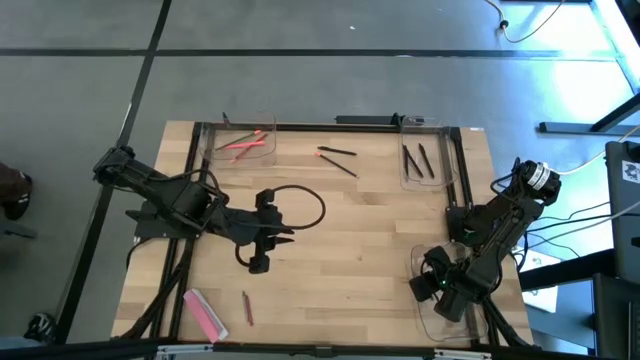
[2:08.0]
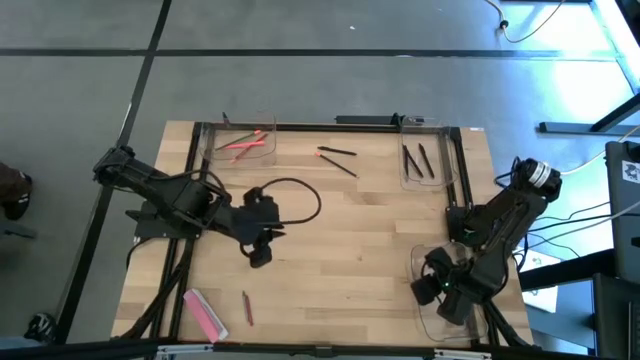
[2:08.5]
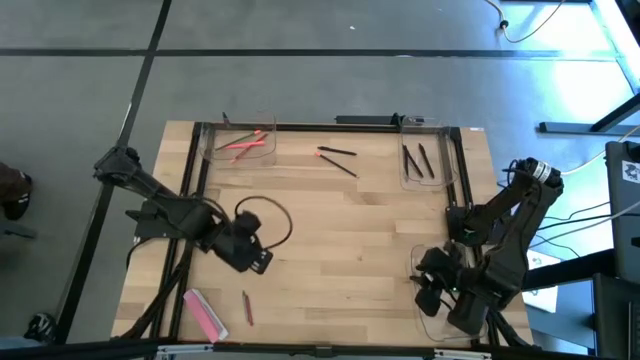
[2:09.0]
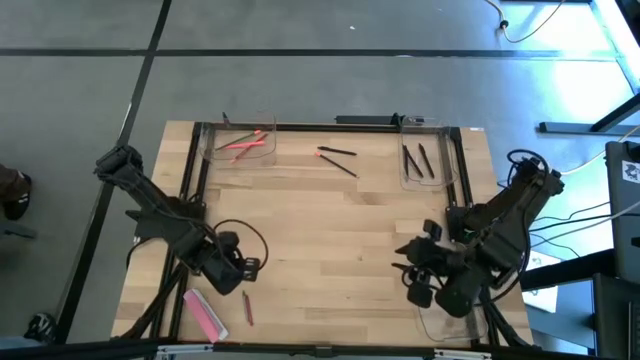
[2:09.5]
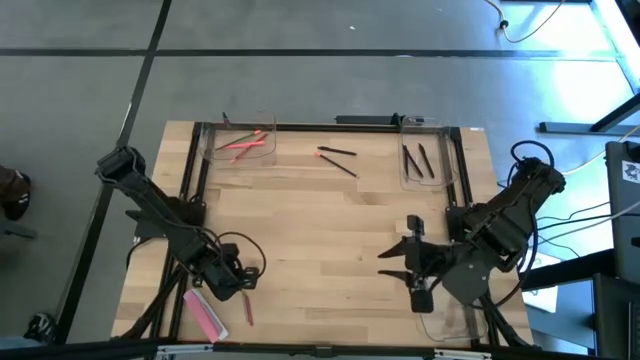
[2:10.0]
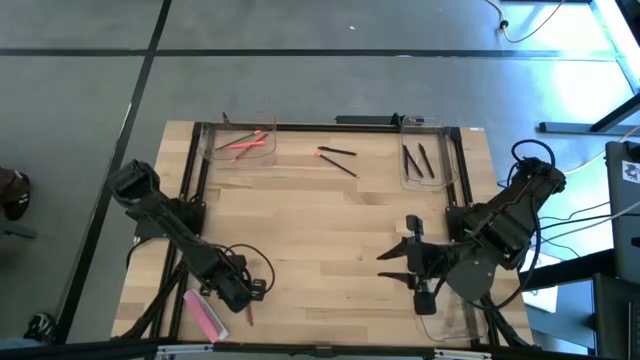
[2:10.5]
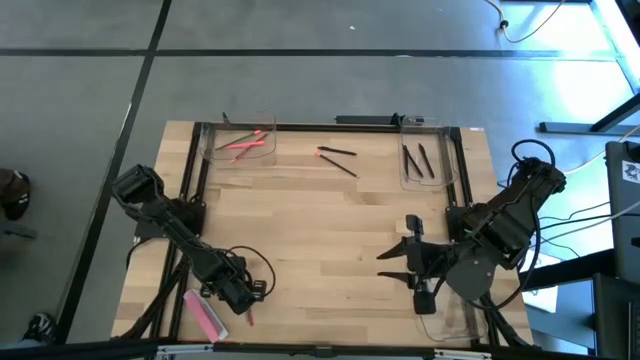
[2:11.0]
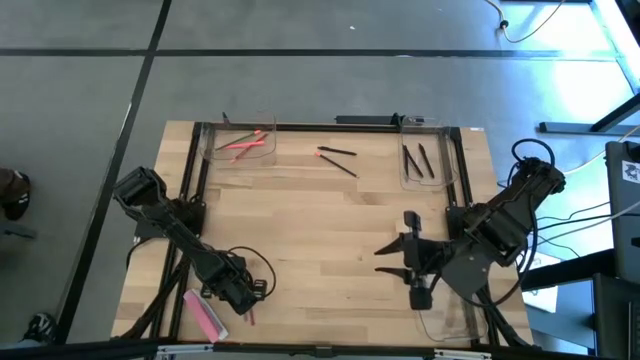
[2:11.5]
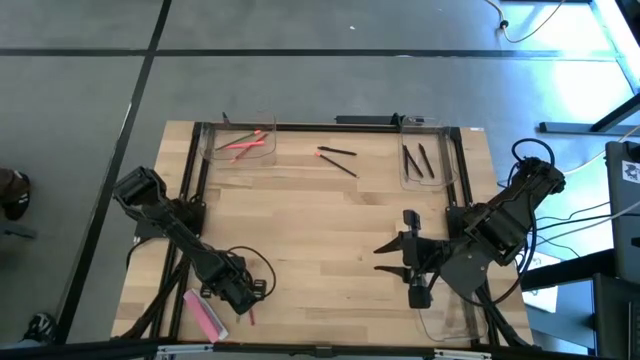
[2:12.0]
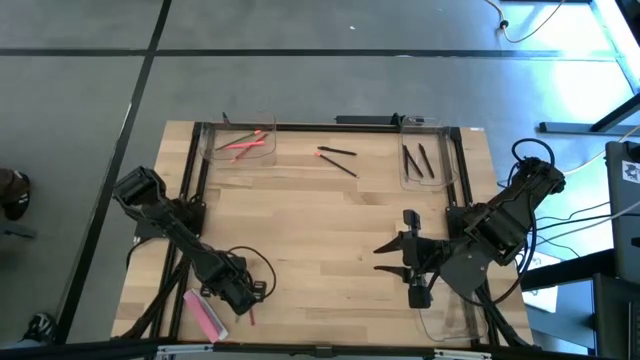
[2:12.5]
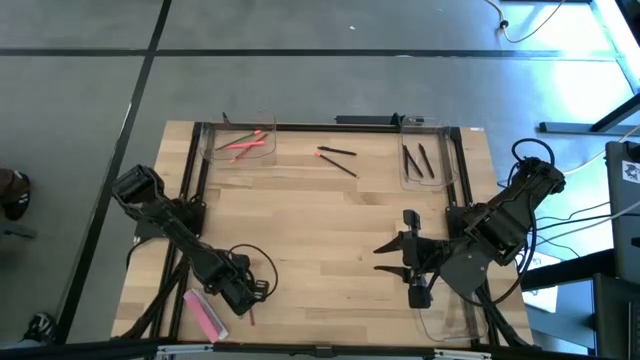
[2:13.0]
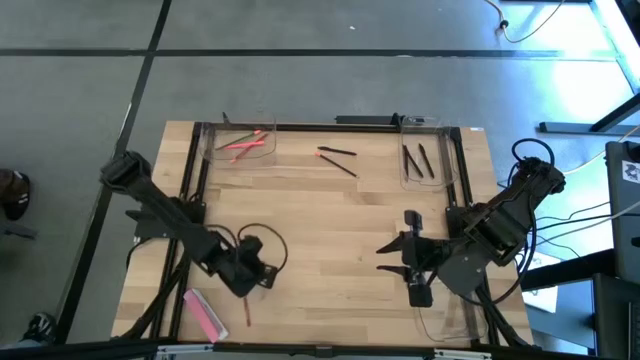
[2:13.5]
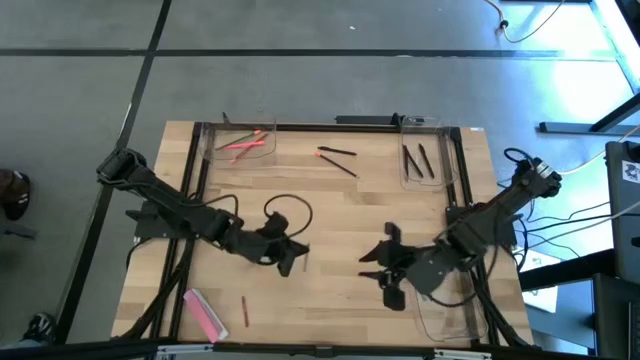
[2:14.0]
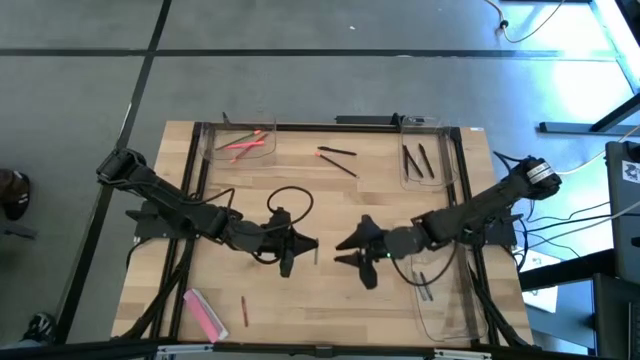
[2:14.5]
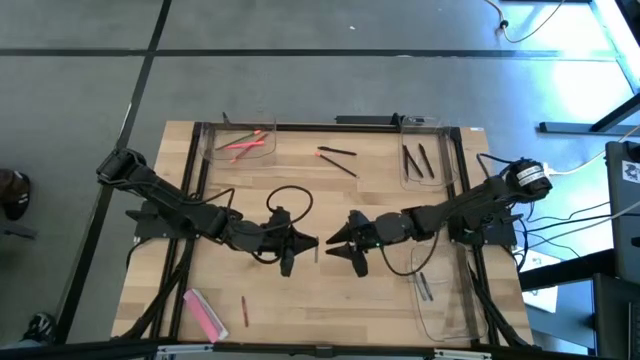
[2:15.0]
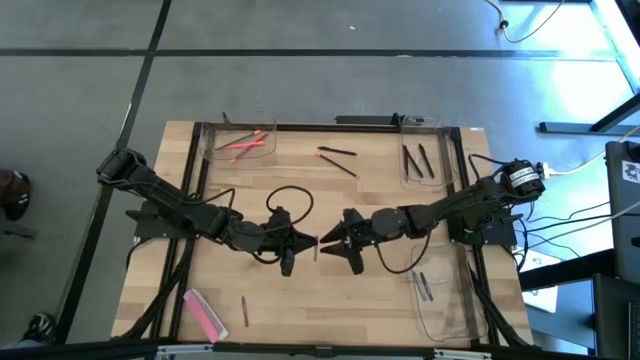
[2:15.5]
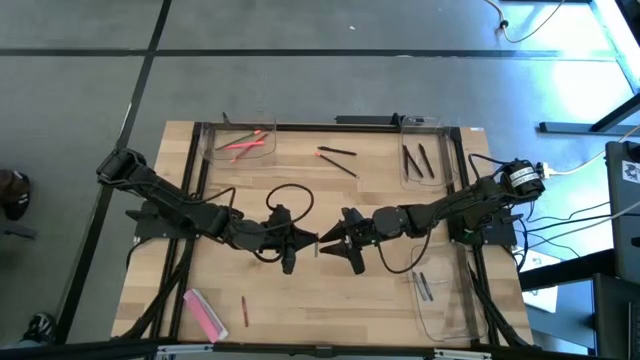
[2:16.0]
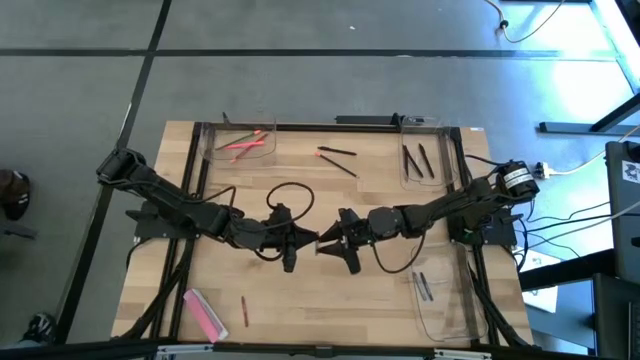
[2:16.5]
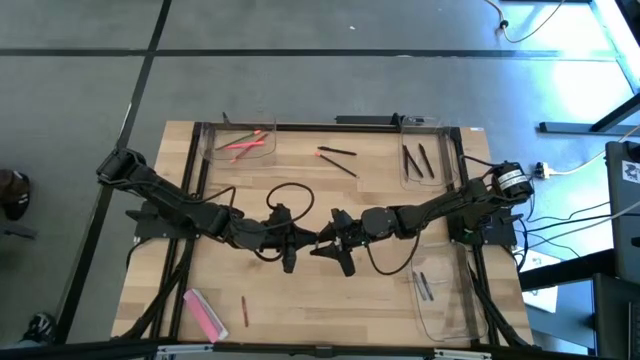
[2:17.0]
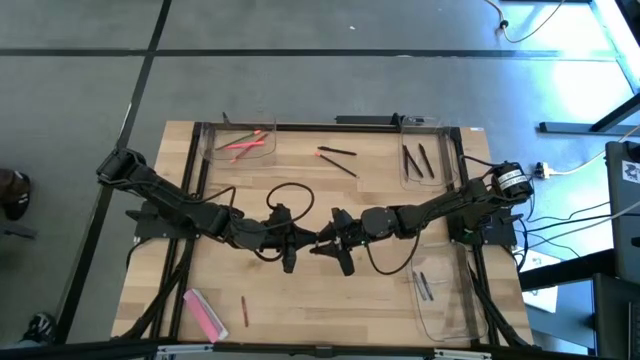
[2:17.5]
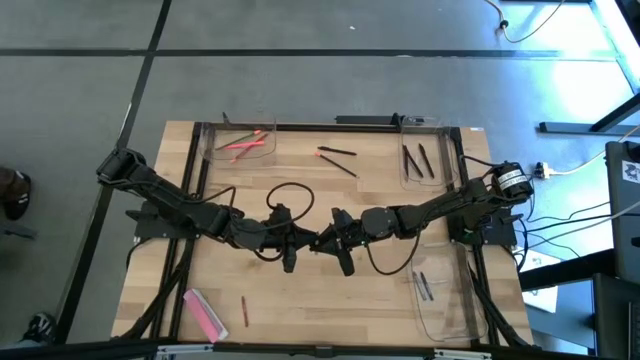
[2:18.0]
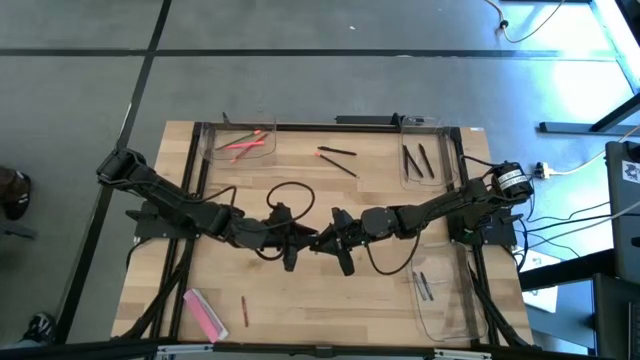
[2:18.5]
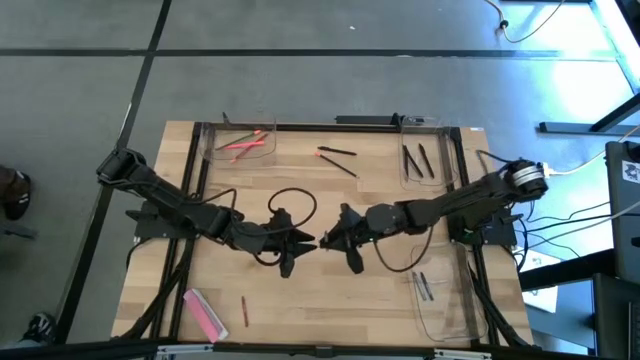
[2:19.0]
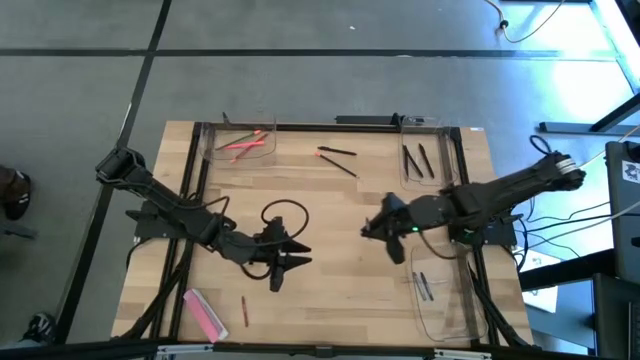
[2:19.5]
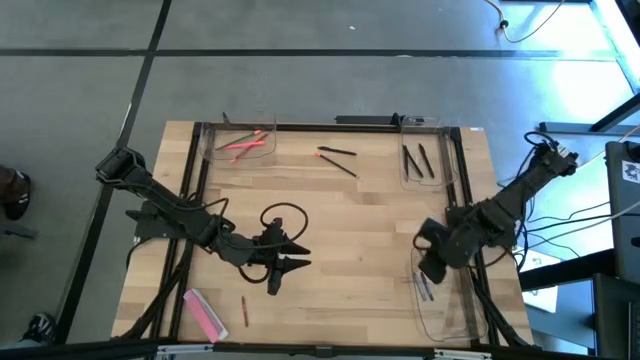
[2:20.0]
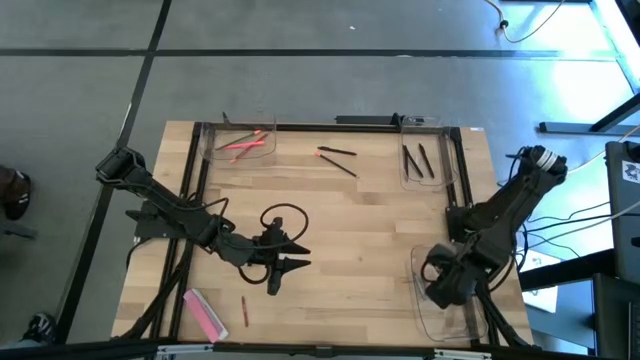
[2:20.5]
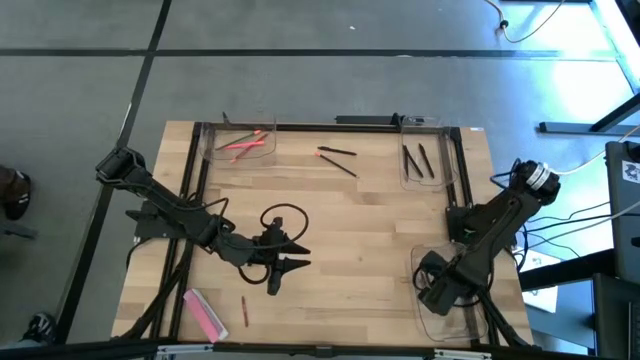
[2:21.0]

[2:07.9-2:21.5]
Task: Sort crayons/erasers/pens/pencils in bins
Put the gray crayon into the bottom transparent bin

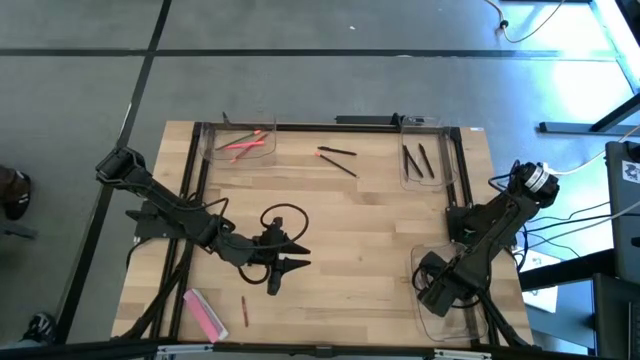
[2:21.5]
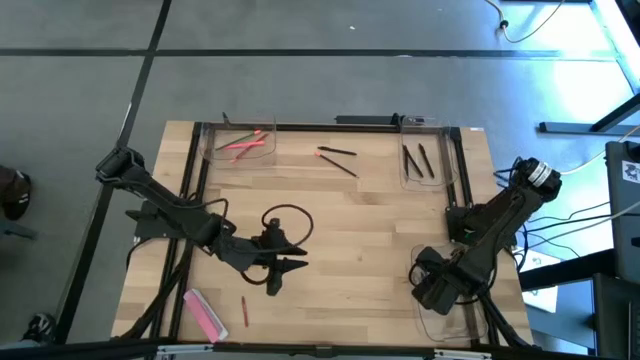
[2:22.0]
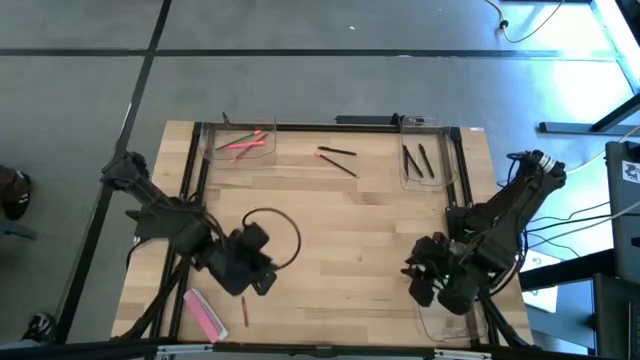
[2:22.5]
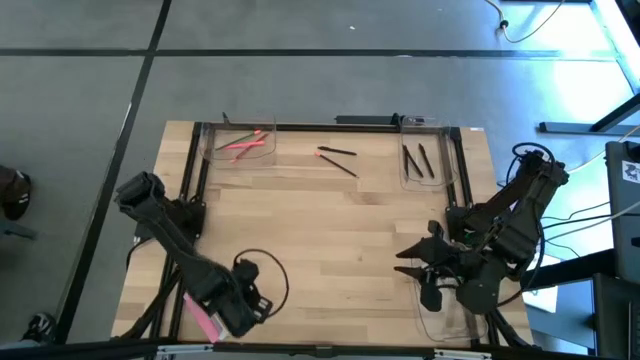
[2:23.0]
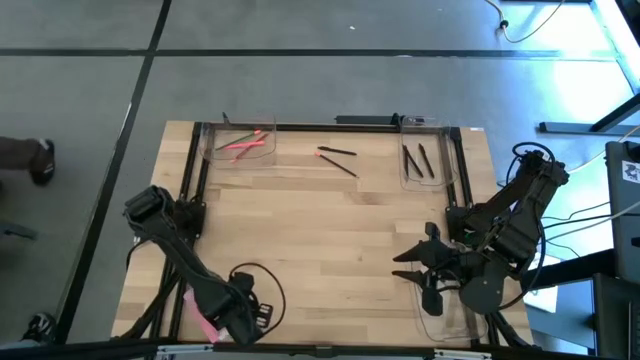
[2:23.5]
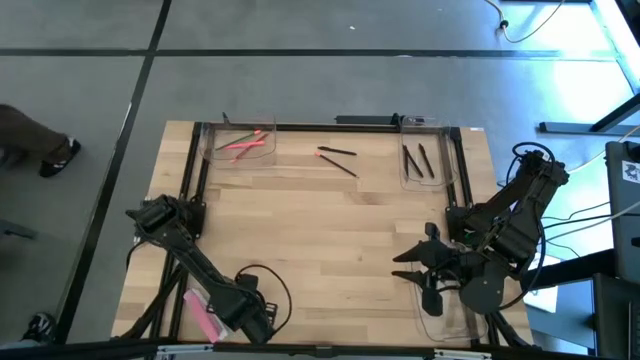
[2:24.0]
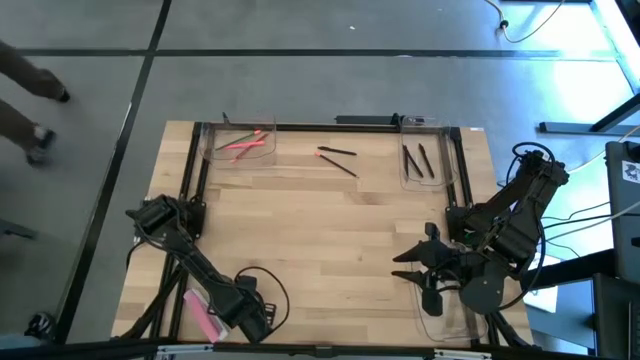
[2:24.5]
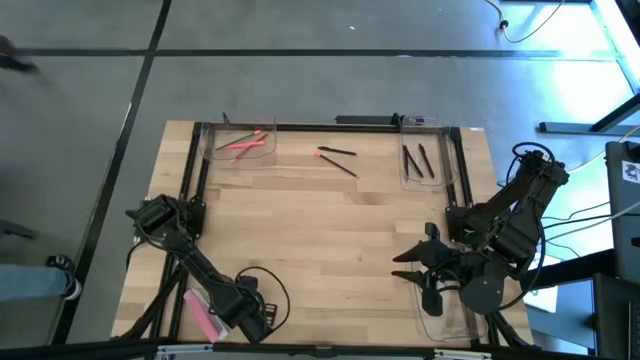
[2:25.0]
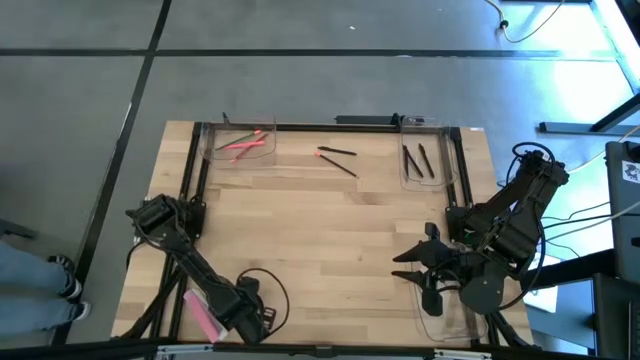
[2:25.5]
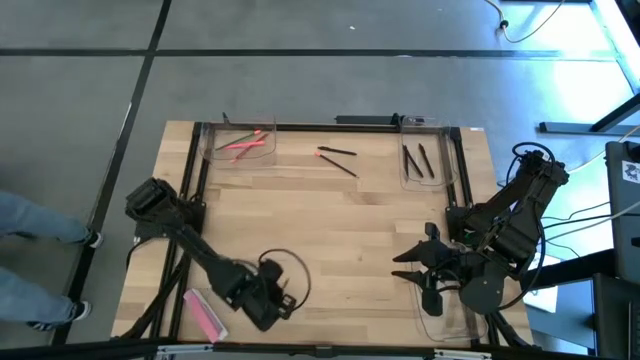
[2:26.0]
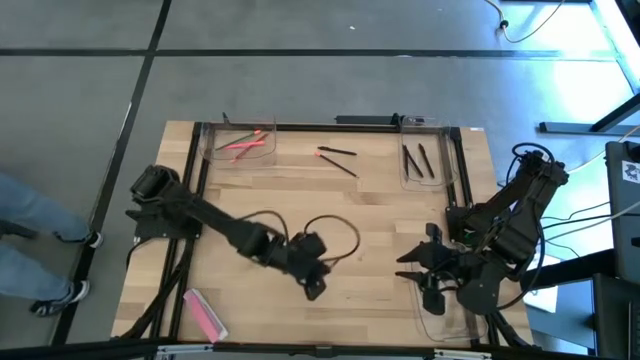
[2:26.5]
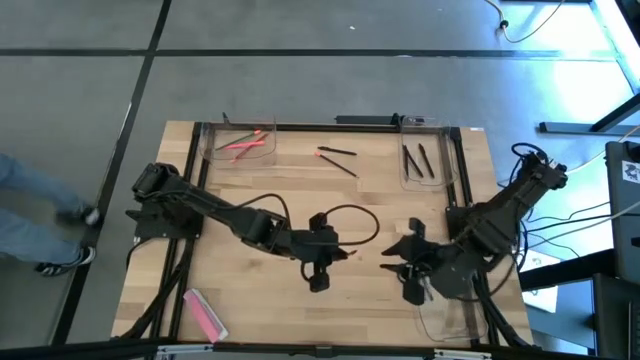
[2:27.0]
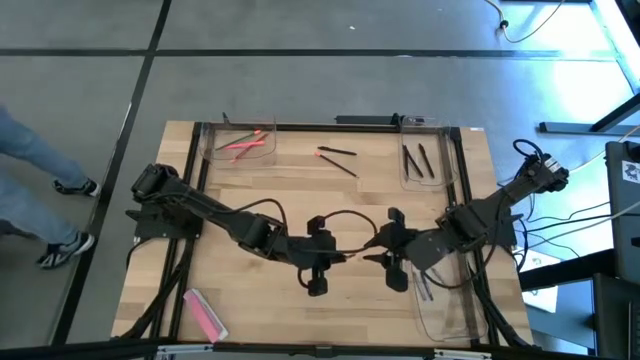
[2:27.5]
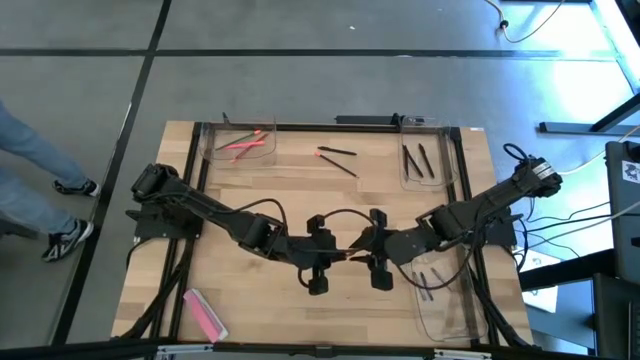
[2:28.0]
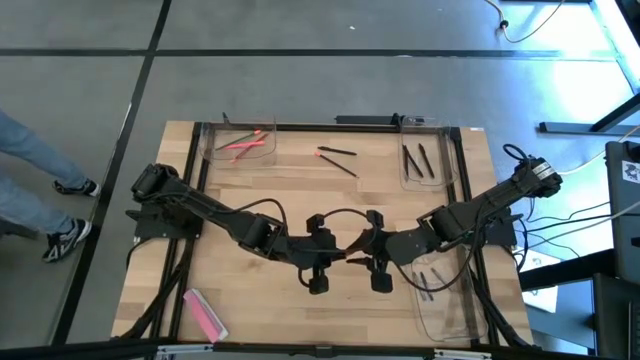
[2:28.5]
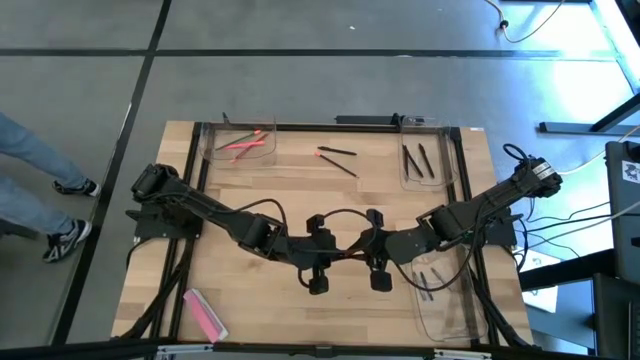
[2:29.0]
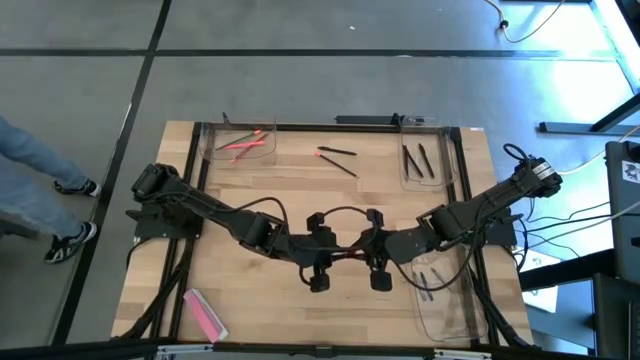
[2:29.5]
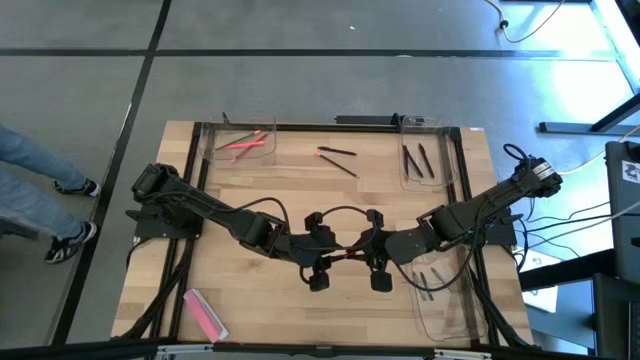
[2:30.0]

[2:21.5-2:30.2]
Put the red crayon into the bottom transparent bin
